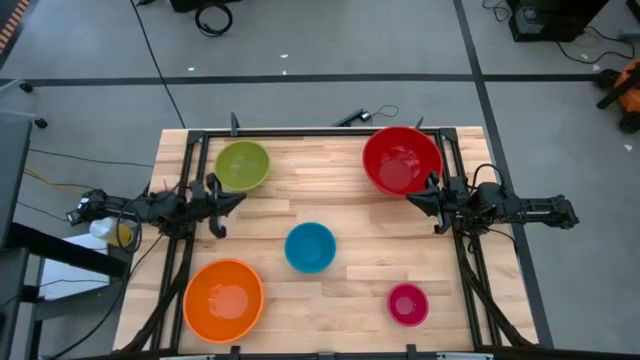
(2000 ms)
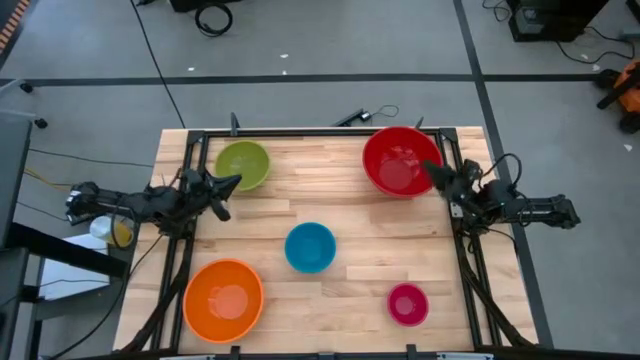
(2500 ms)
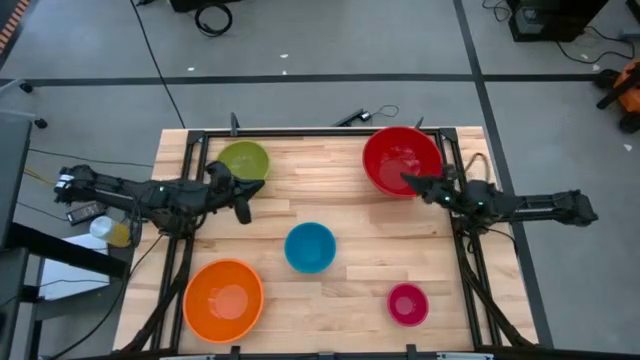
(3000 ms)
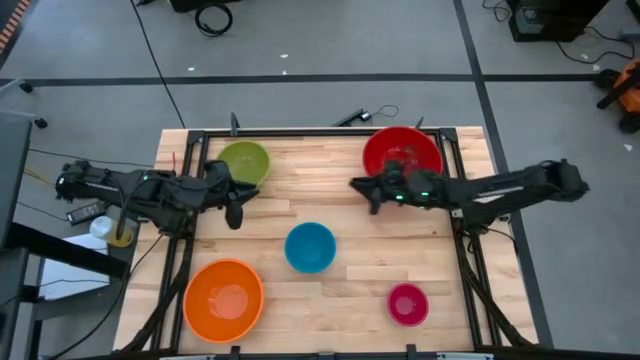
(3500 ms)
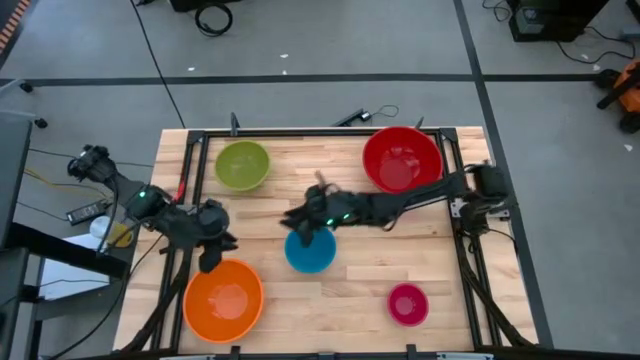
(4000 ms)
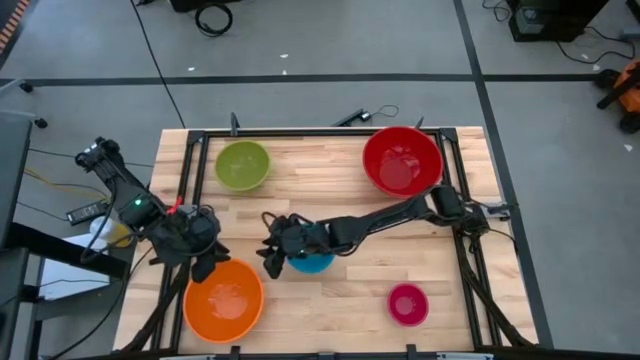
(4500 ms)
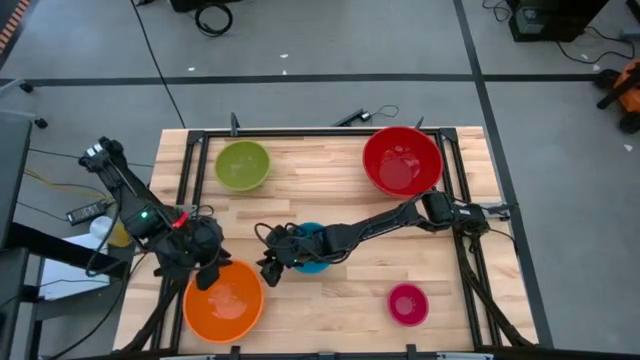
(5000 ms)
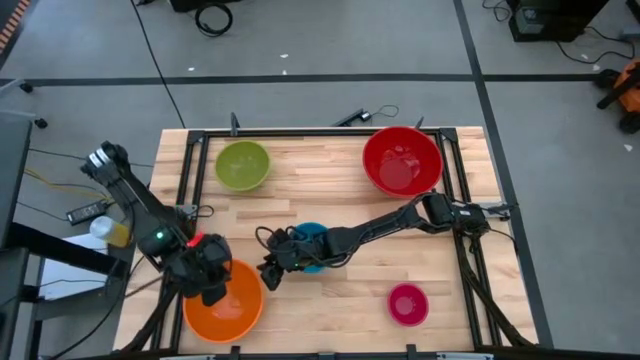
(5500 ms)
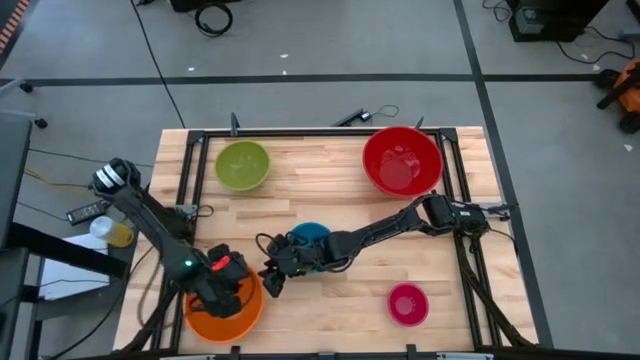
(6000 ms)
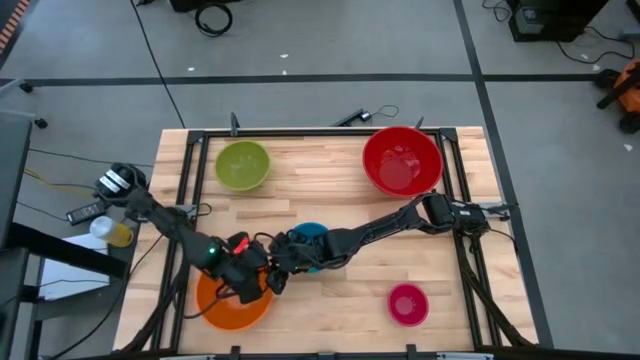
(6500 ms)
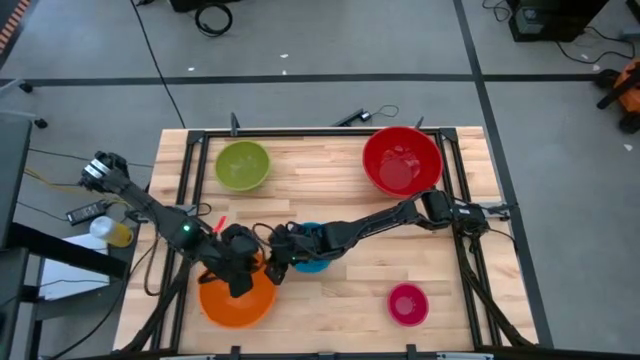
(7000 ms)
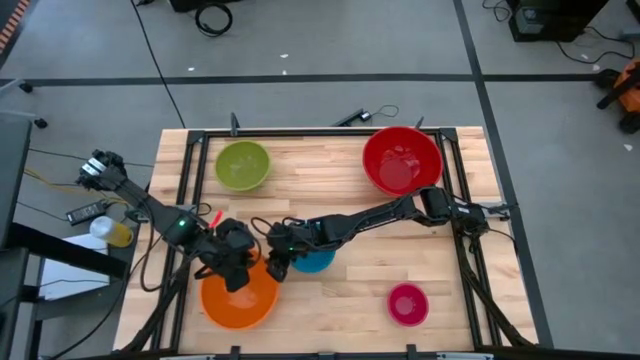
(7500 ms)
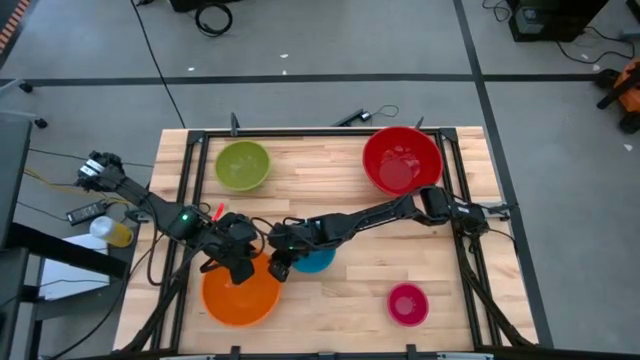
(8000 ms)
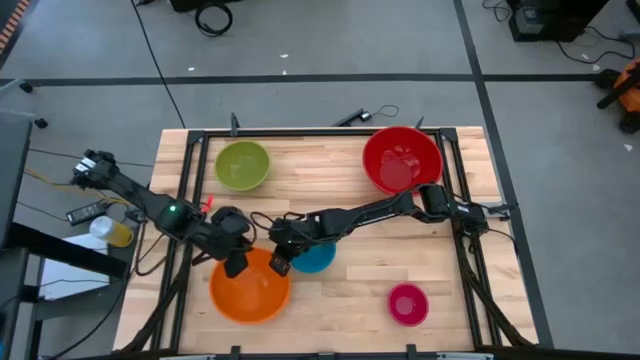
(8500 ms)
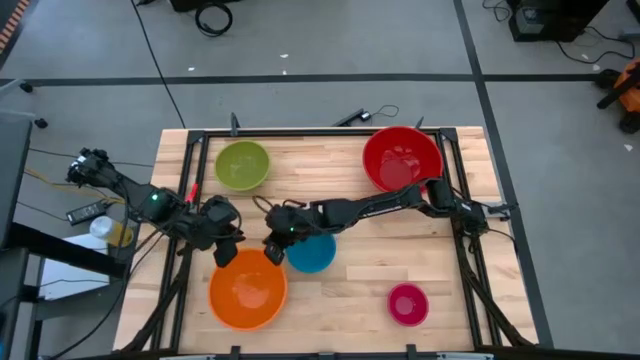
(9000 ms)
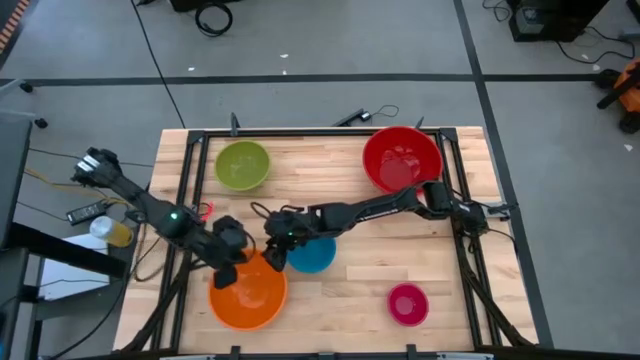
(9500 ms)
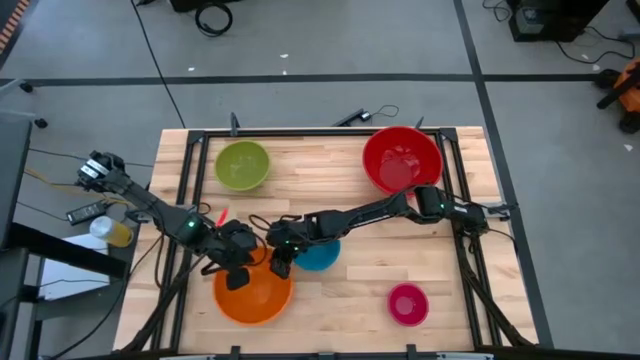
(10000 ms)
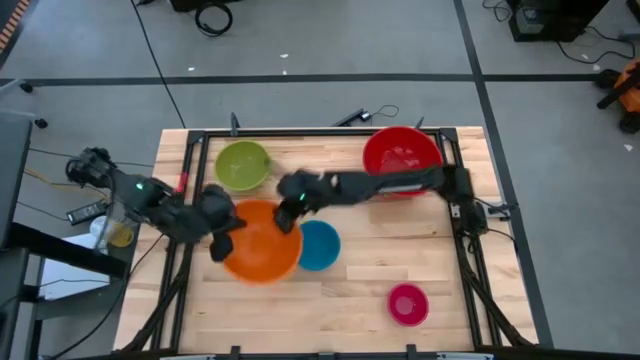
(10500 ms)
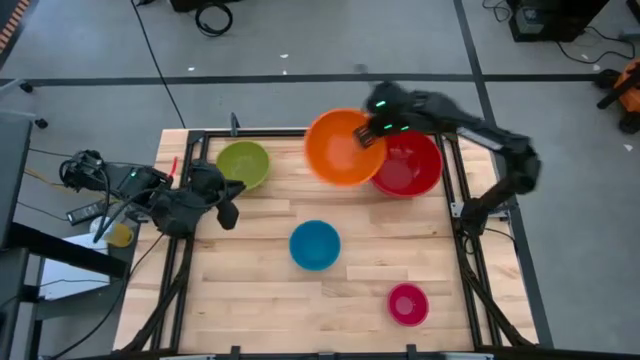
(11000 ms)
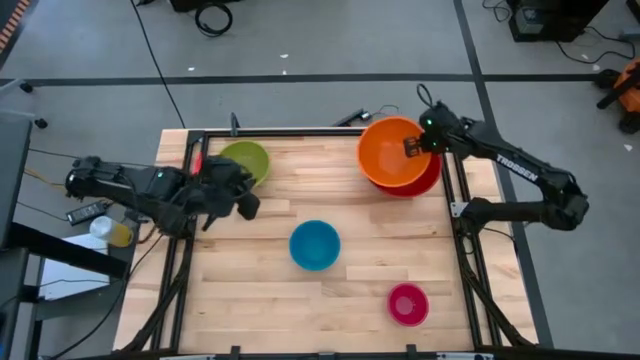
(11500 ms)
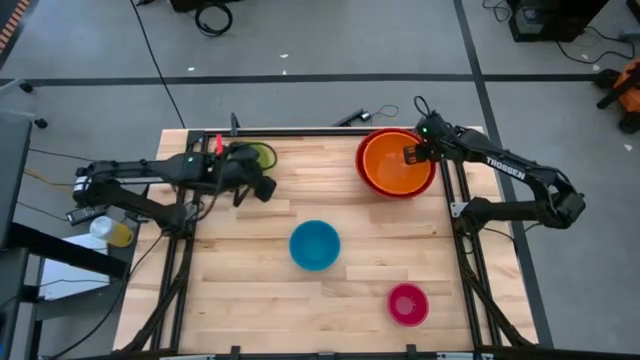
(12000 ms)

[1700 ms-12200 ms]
Stack the orange bowl on top of the red bowl

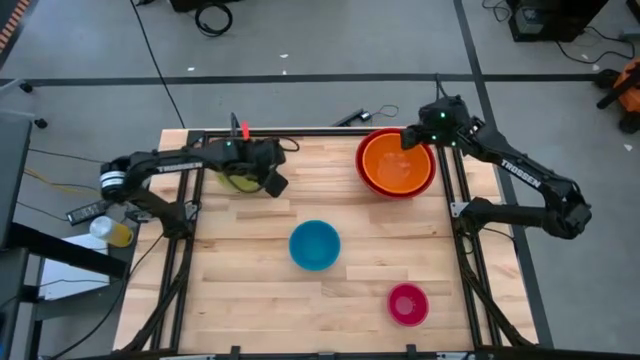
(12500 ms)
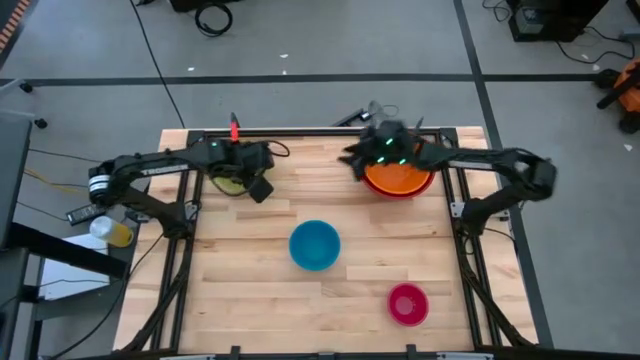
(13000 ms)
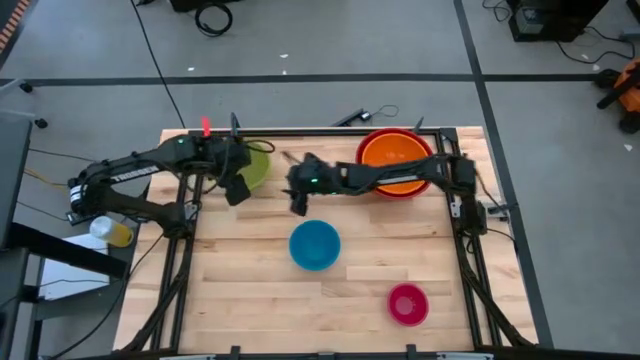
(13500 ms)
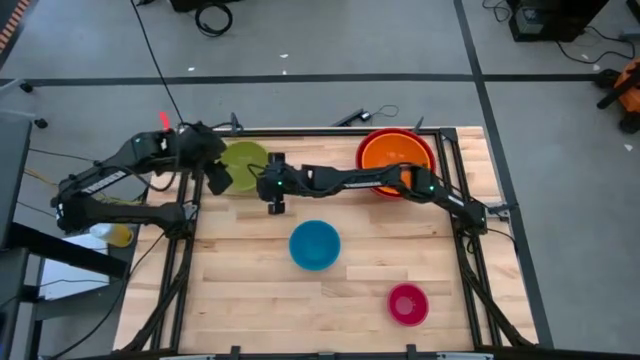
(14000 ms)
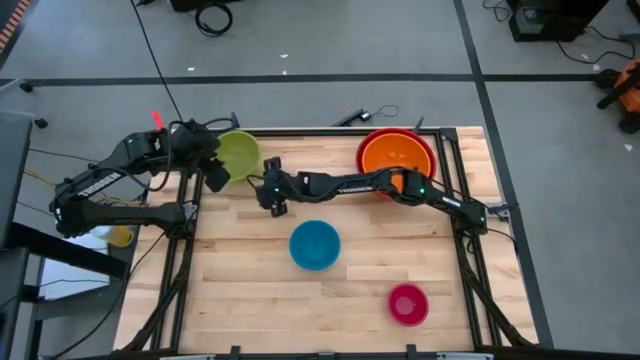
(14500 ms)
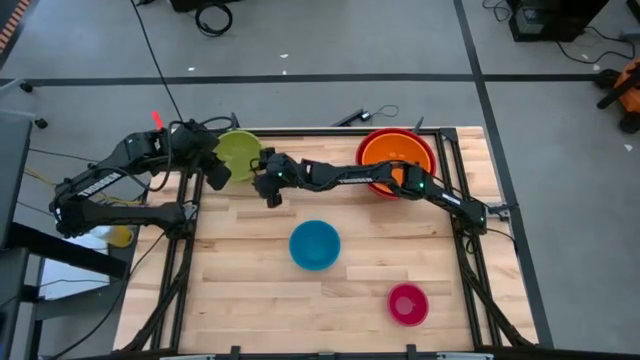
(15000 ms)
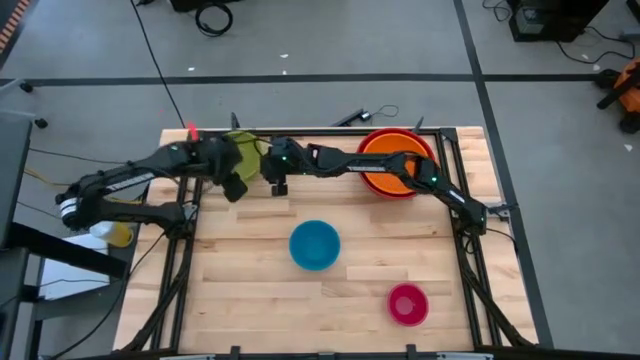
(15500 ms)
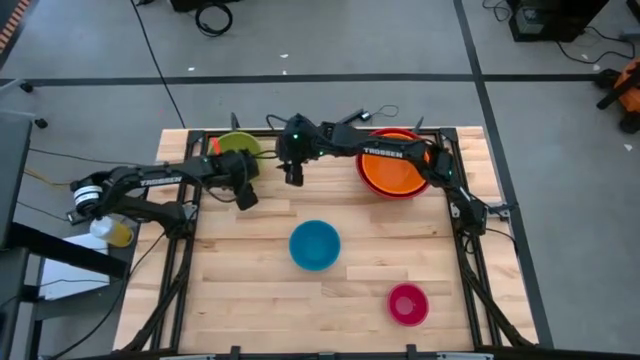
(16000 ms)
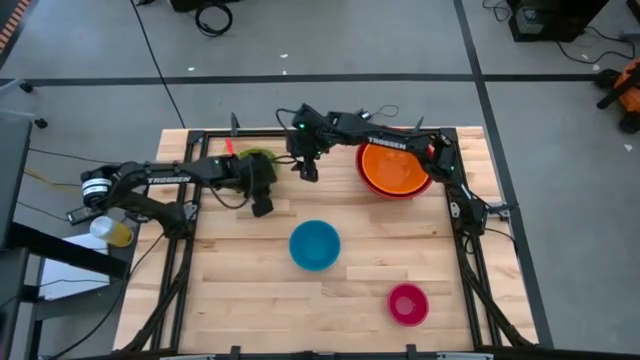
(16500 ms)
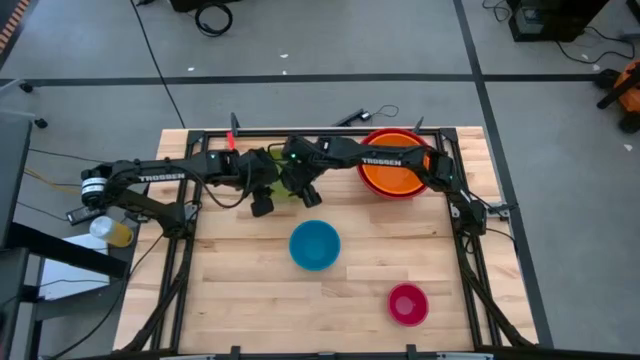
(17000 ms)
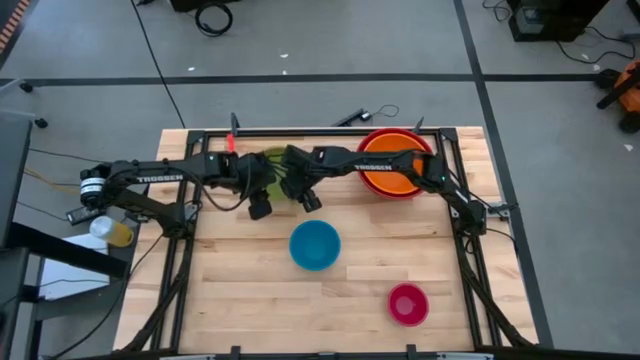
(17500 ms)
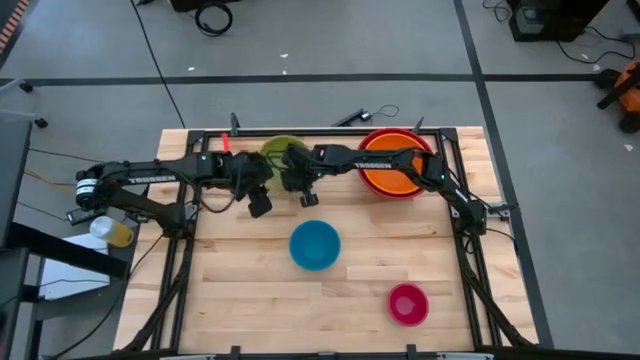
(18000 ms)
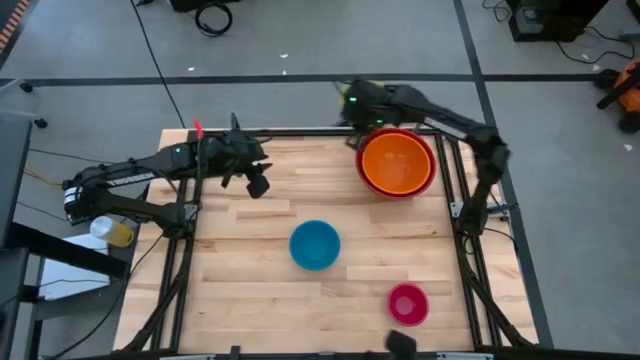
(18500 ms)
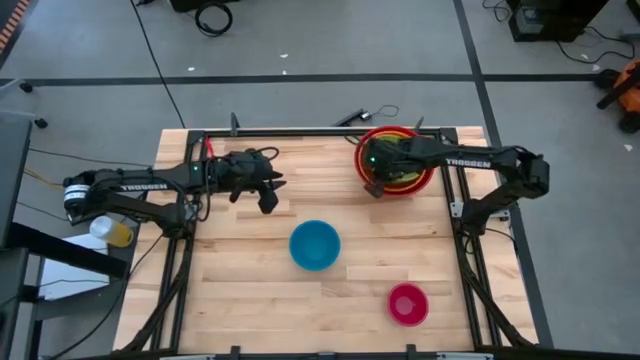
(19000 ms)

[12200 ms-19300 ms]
Stack the green bowl on top of the orange bowl

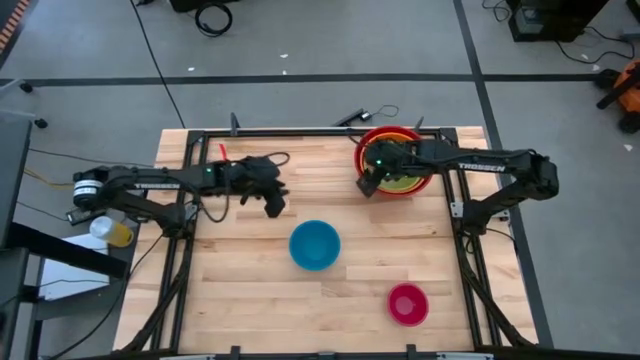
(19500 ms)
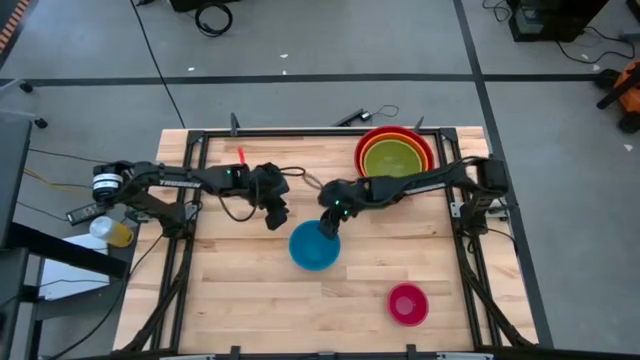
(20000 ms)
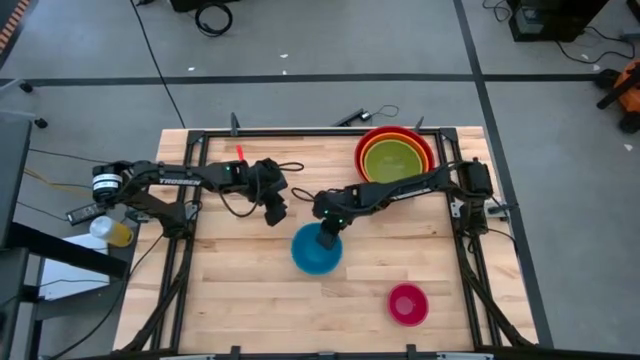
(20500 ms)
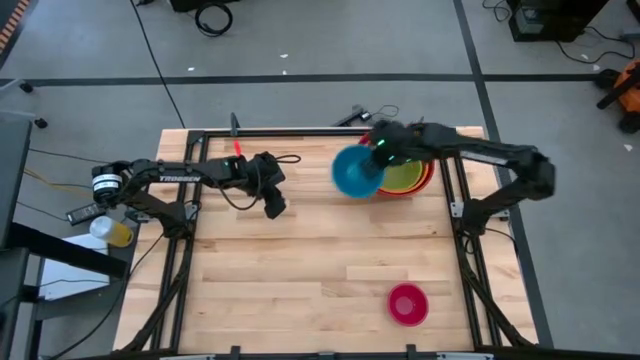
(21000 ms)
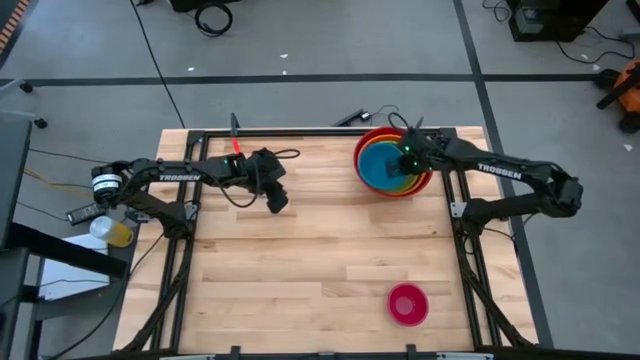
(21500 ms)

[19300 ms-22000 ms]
Stack the blue bowl on top of the green bowl

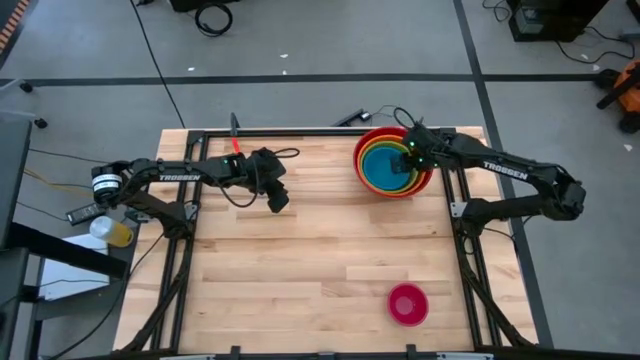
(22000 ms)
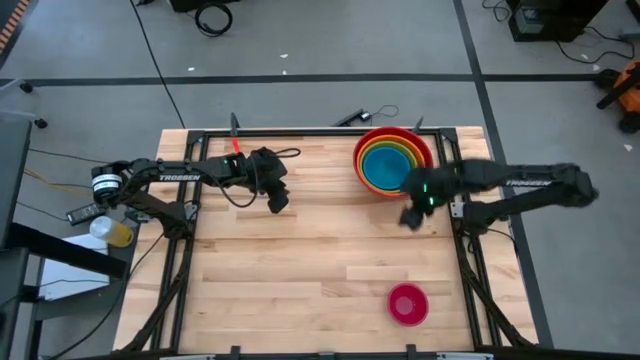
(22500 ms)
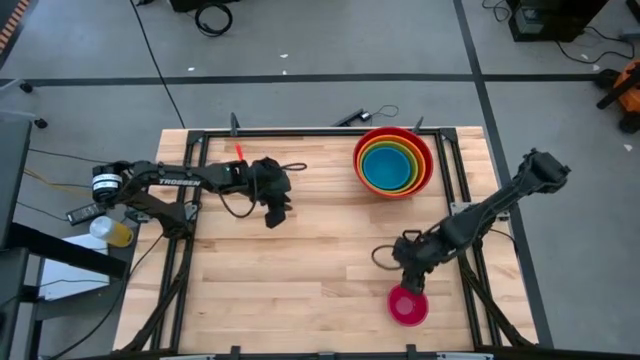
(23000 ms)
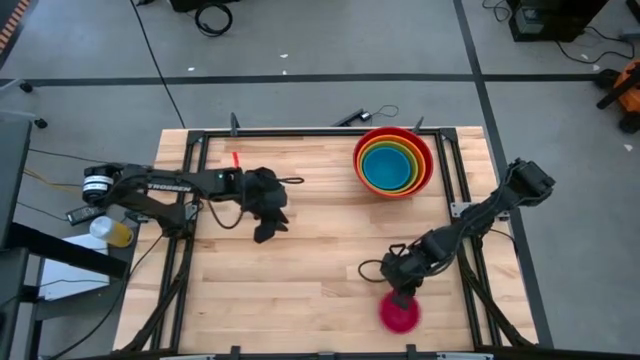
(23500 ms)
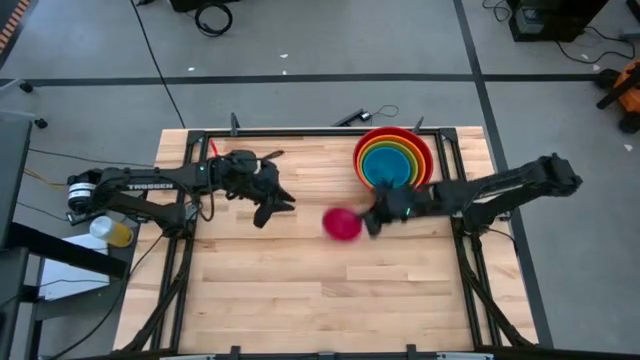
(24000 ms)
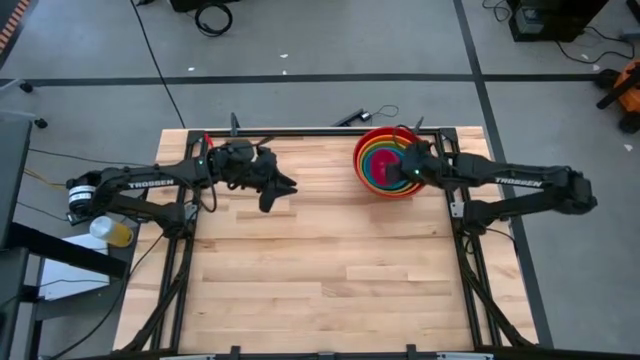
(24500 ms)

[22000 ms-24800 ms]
Stack the pink bowl on top of the blue bowl
